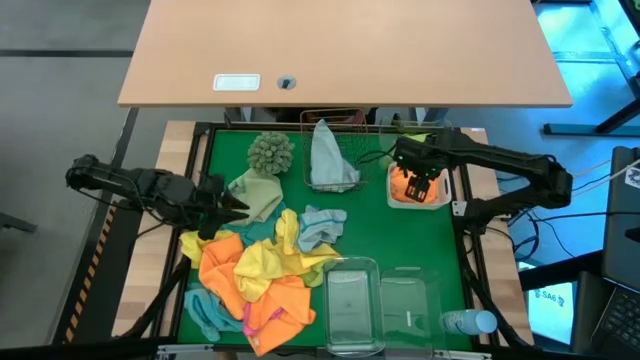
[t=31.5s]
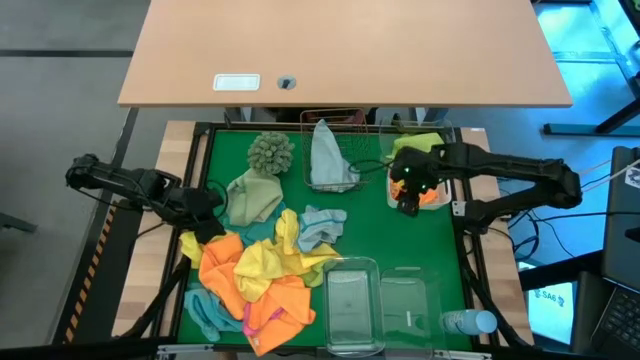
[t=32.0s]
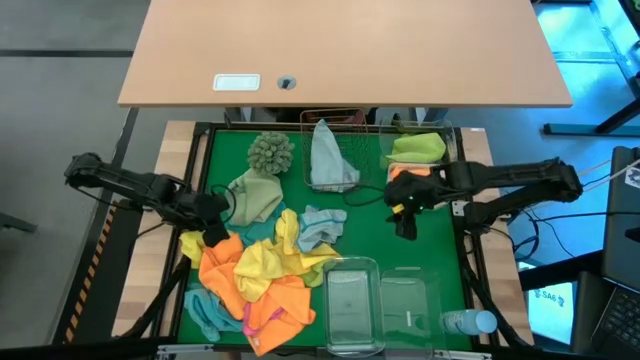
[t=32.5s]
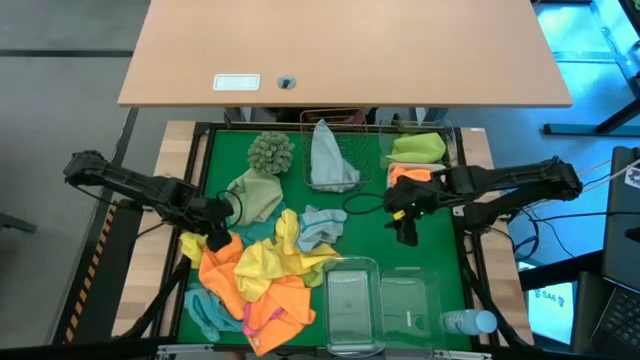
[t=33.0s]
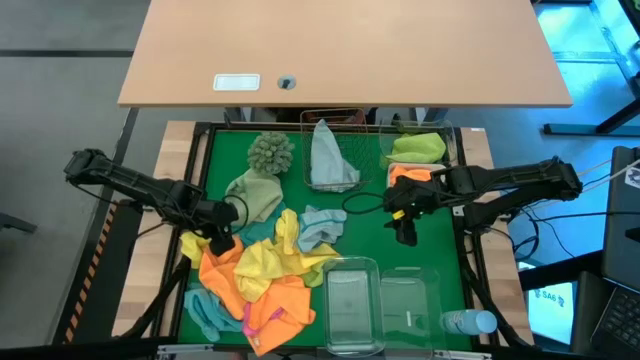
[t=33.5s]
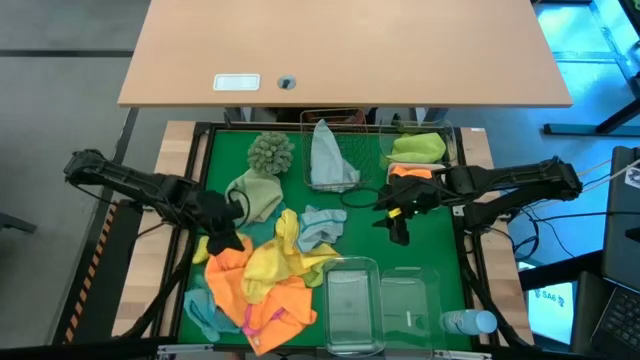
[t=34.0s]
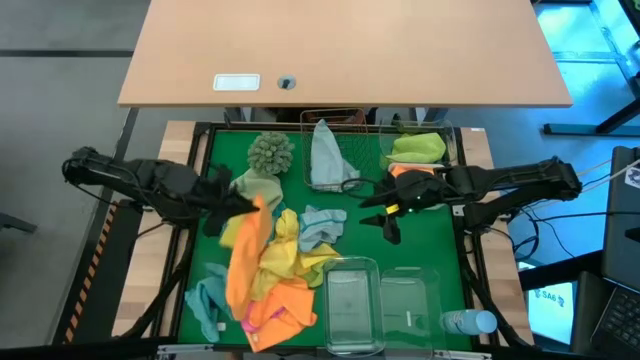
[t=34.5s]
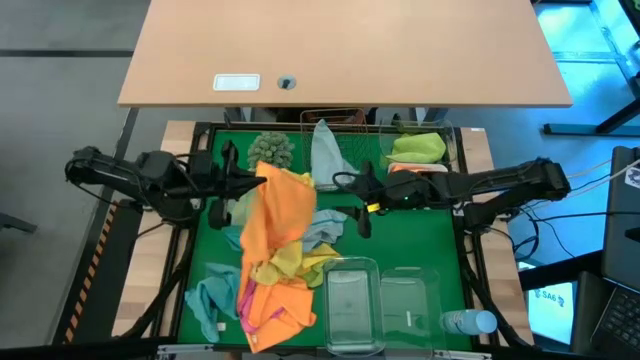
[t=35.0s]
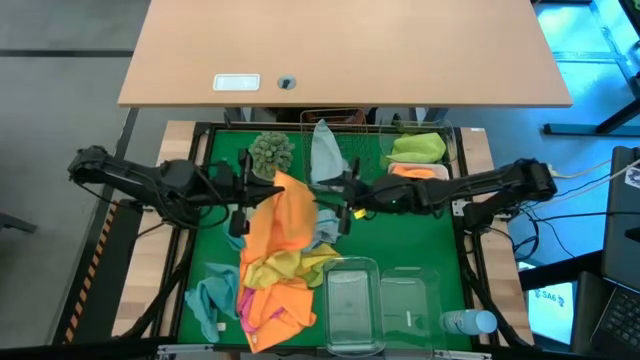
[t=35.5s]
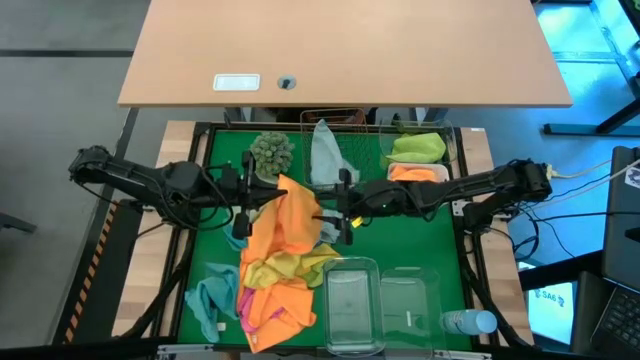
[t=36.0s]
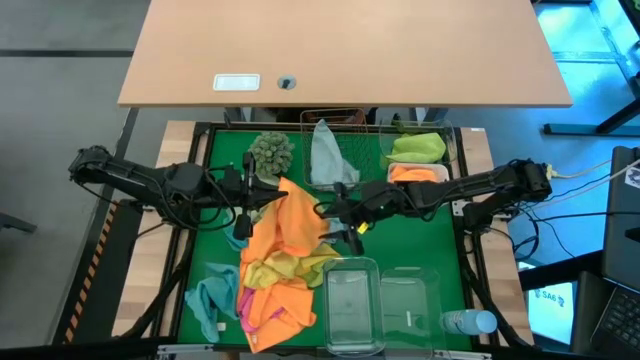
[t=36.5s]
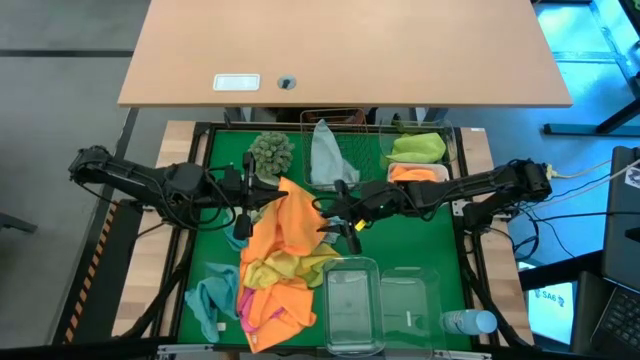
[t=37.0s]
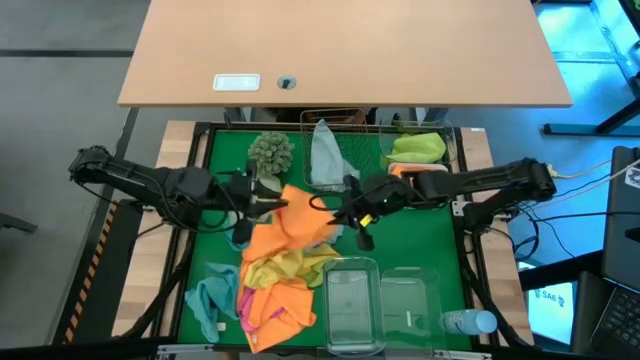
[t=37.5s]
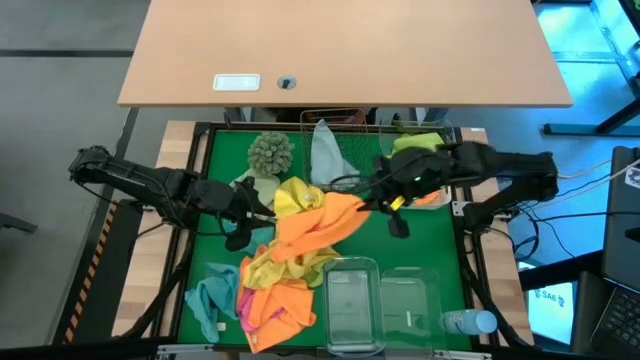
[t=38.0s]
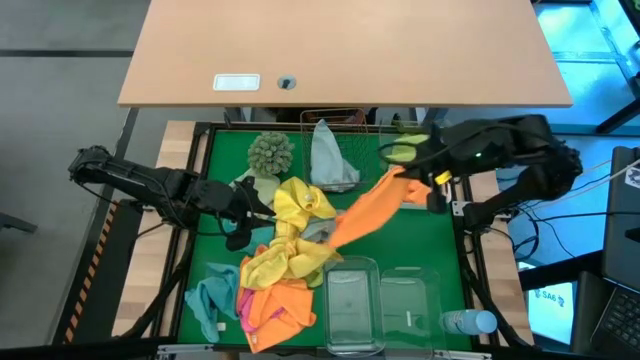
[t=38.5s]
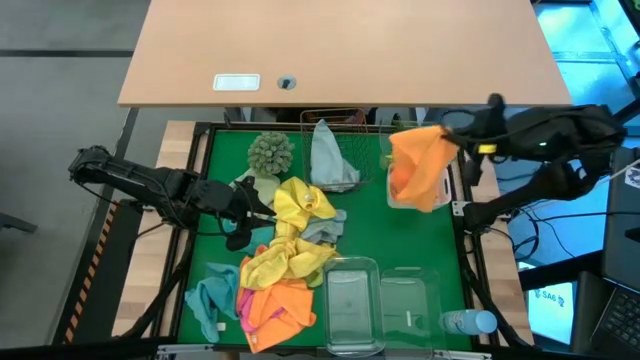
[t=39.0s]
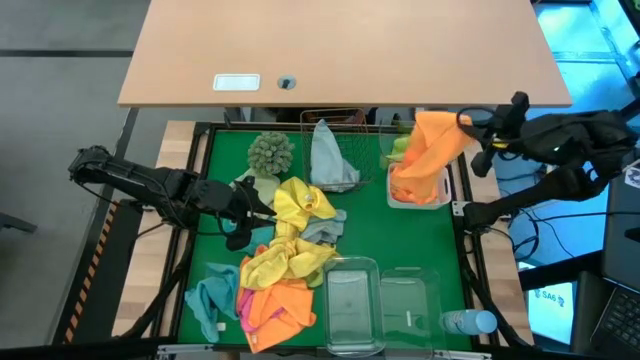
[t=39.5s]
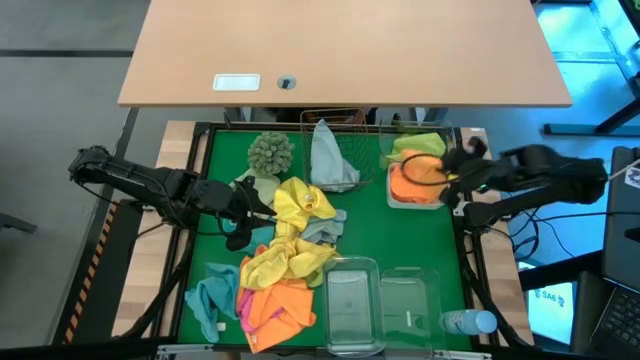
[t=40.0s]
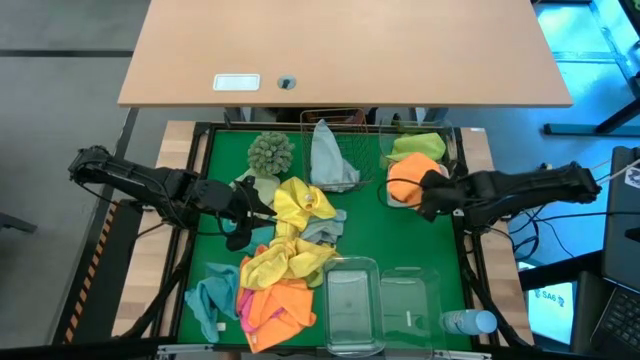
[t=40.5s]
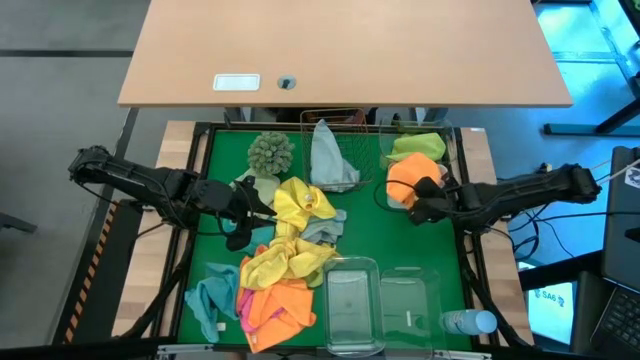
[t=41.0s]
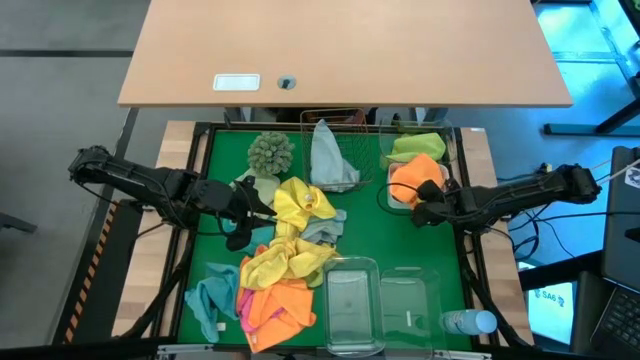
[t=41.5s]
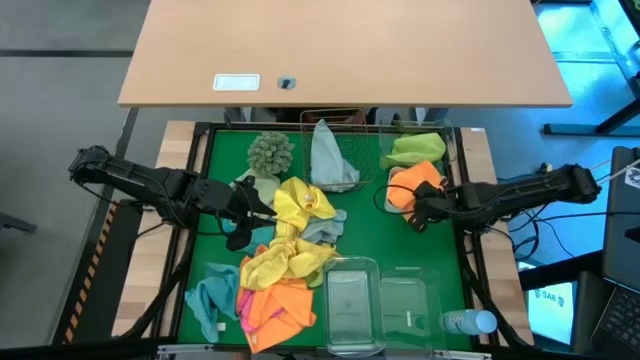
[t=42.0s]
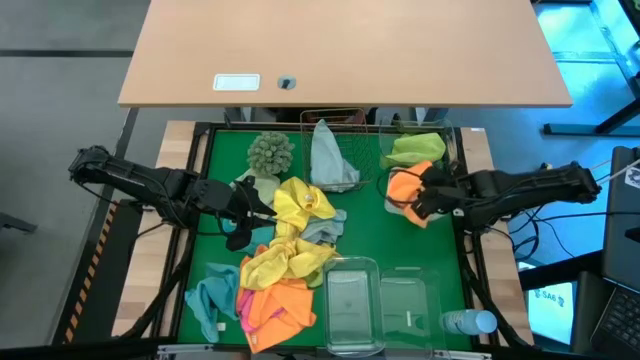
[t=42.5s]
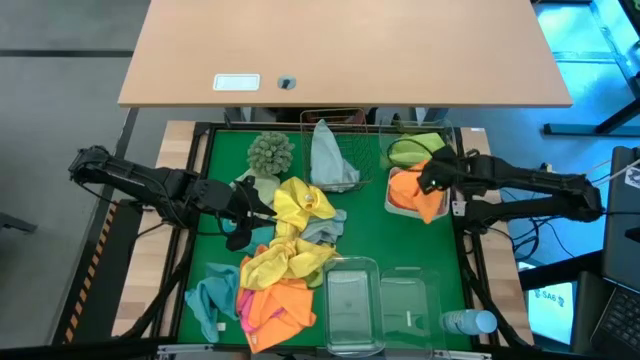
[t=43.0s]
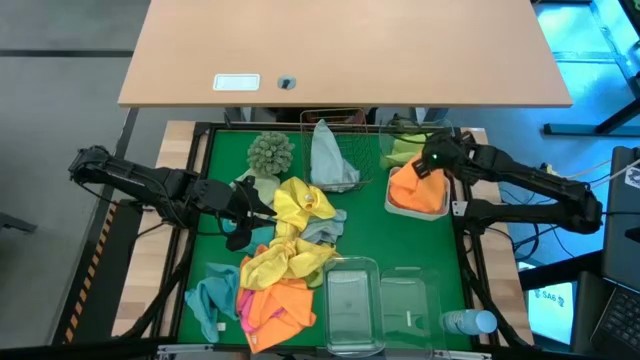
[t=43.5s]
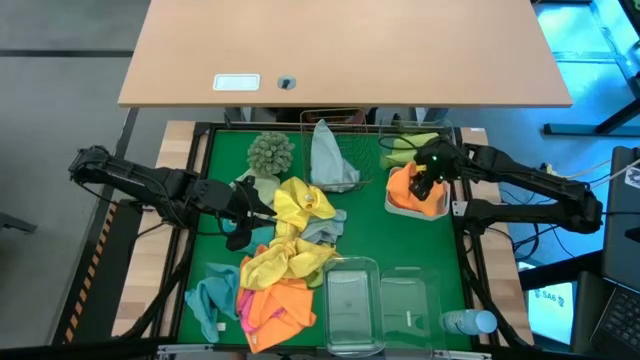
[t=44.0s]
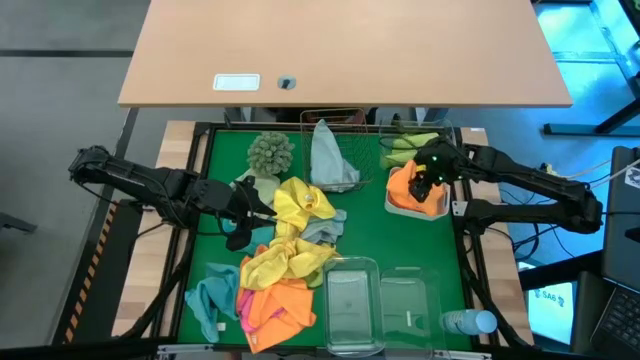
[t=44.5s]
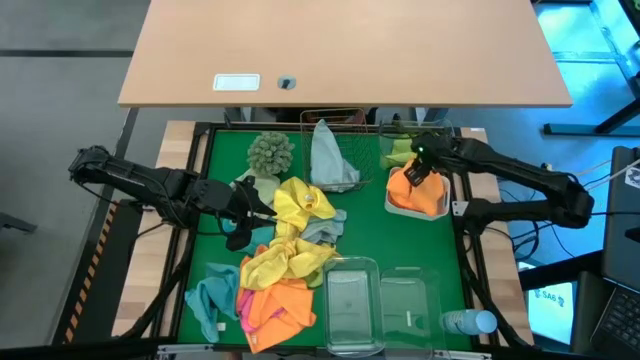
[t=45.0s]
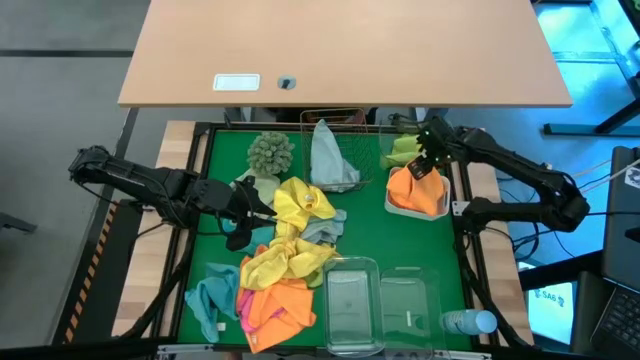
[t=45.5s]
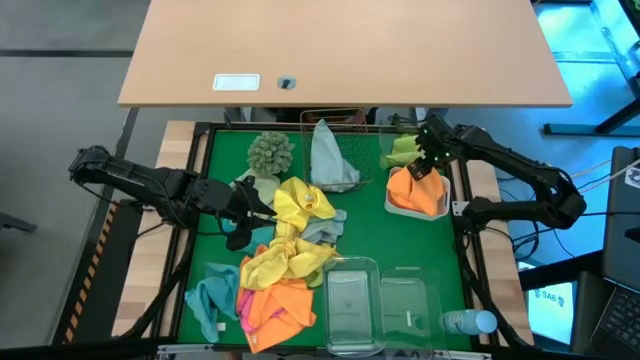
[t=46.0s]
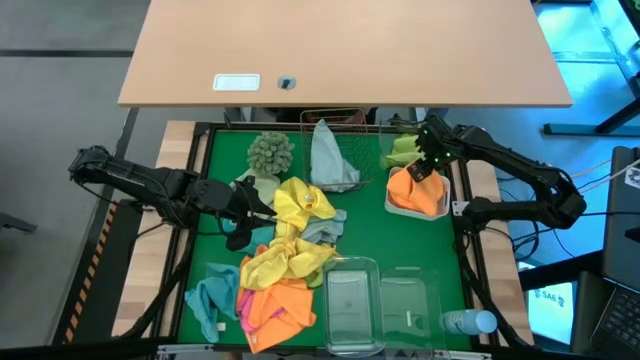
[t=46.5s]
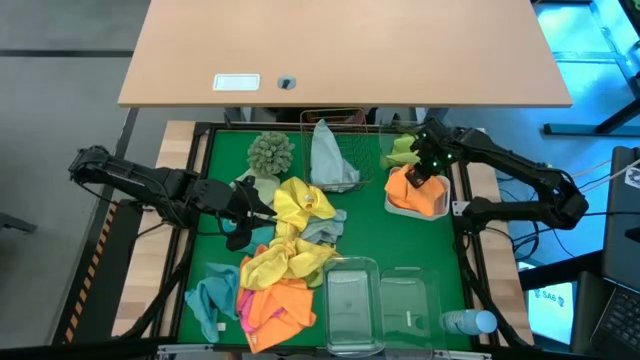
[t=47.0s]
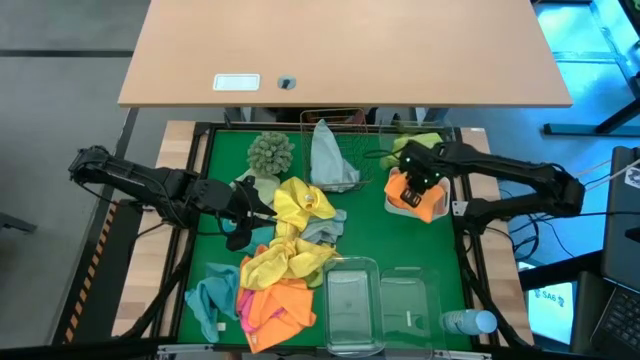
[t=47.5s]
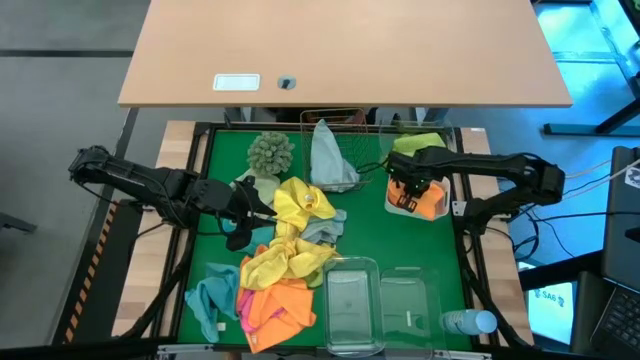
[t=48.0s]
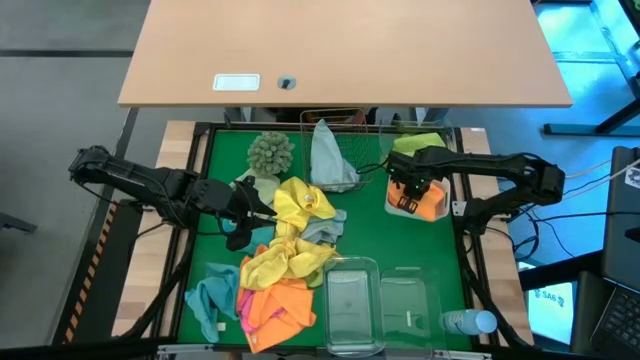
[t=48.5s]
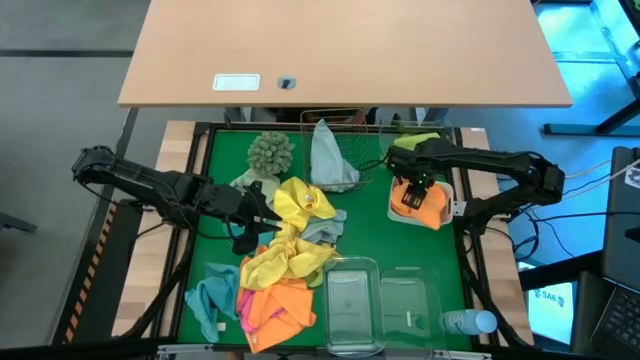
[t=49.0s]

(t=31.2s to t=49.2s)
Task: Sort microfiber towel by color & place in baskets
Put the orange microfiber towel into the white bin

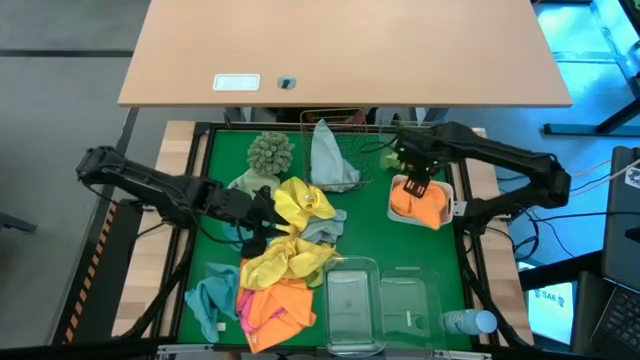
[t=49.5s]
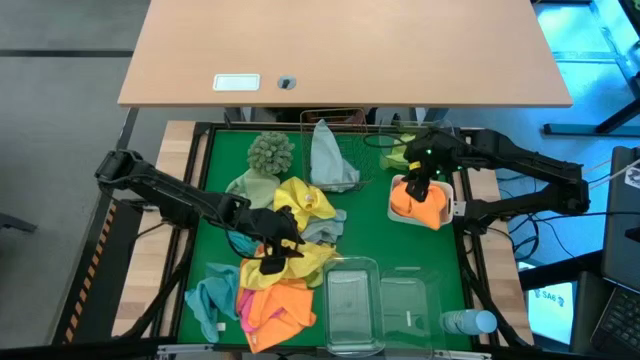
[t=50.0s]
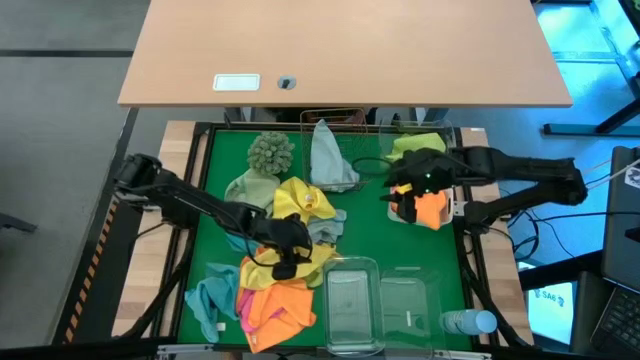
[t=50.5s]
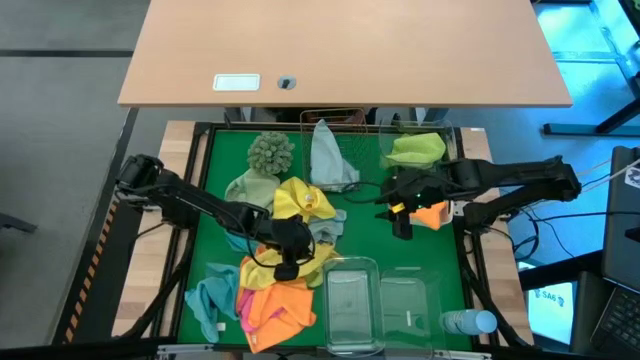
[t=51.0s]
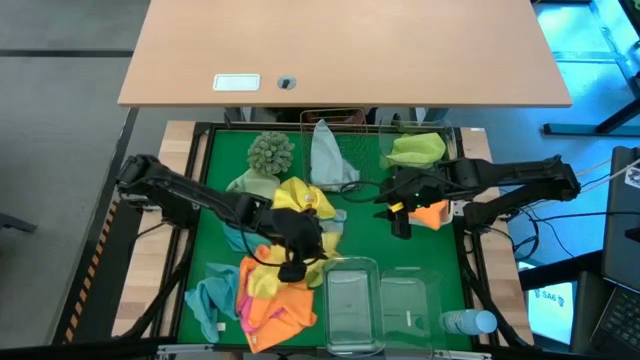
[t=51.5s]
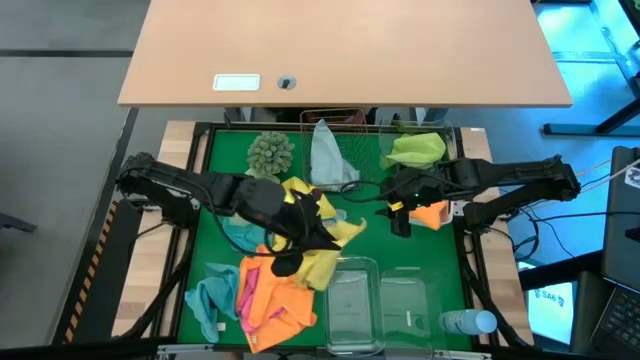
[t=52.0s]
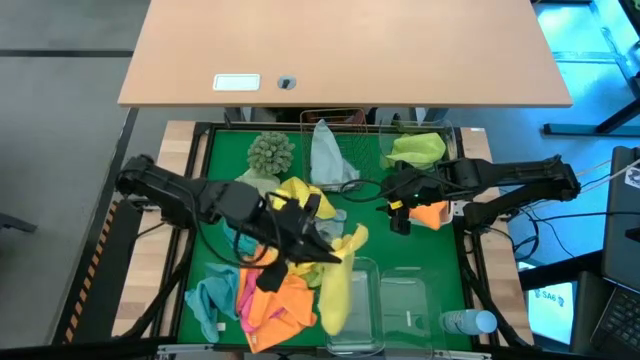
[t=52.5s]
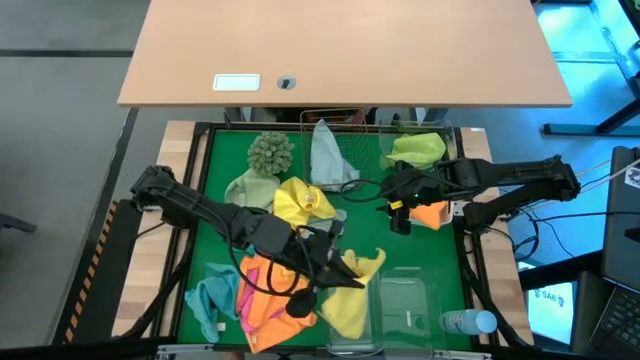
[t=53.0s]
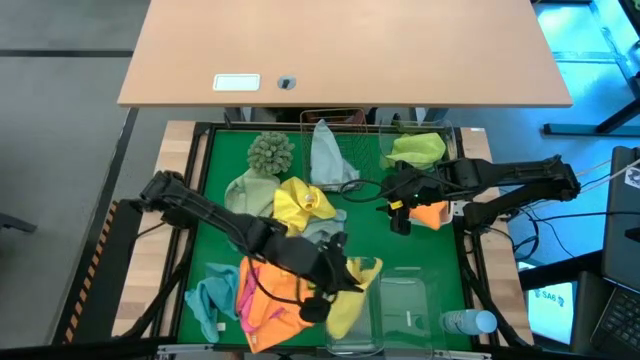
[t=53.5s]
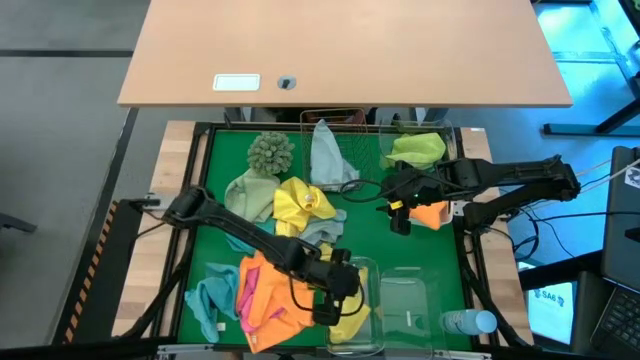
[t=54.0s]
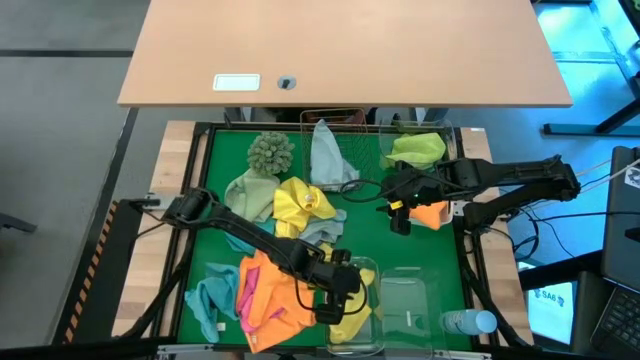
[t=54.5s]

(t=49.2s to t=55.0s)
Put the yellow microfiber towel into the bottom left transparent bin
